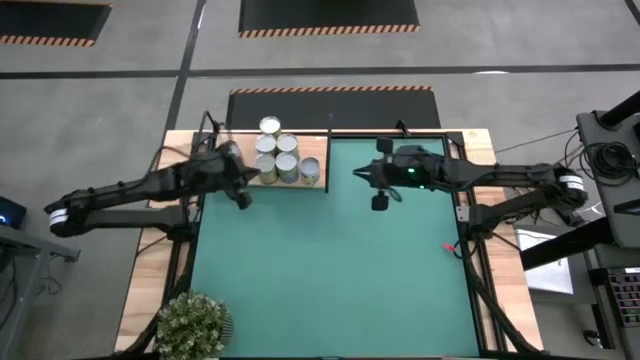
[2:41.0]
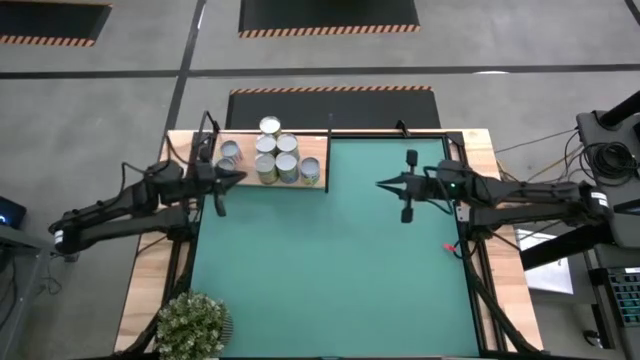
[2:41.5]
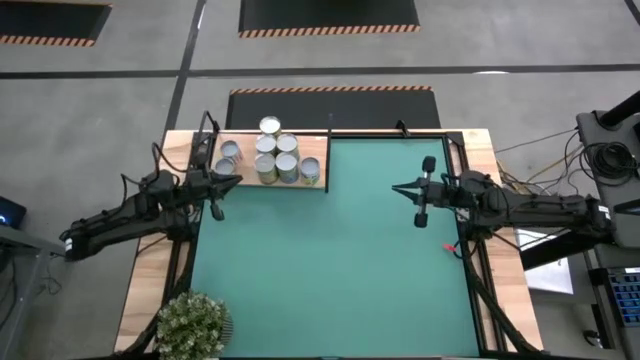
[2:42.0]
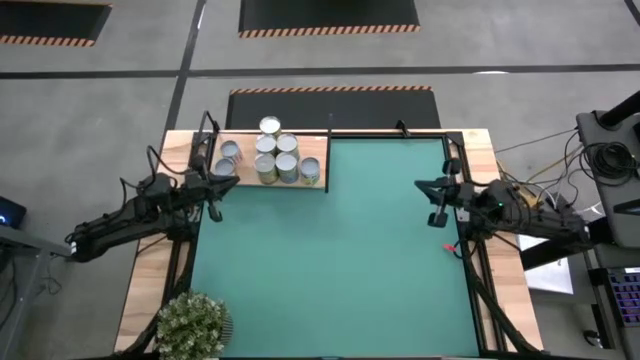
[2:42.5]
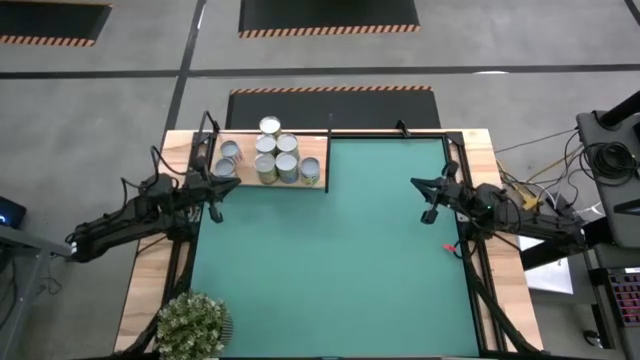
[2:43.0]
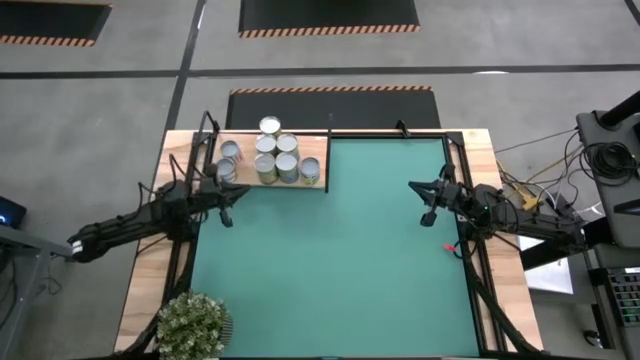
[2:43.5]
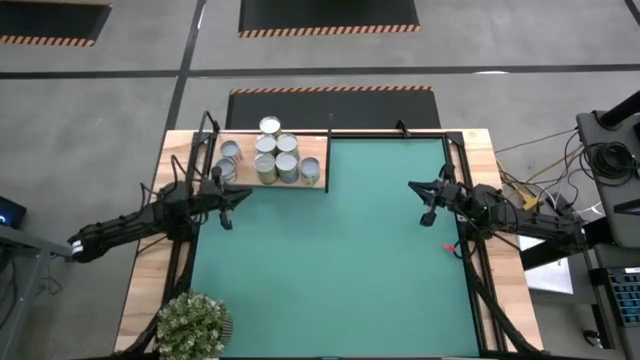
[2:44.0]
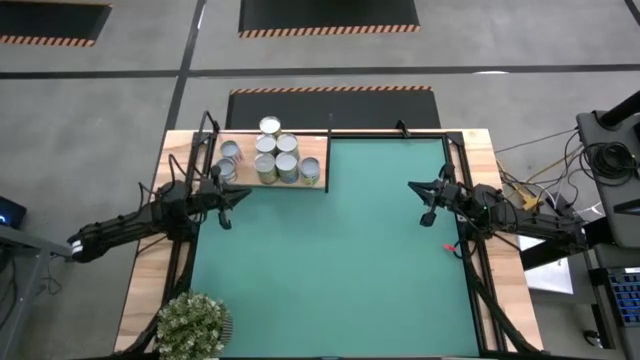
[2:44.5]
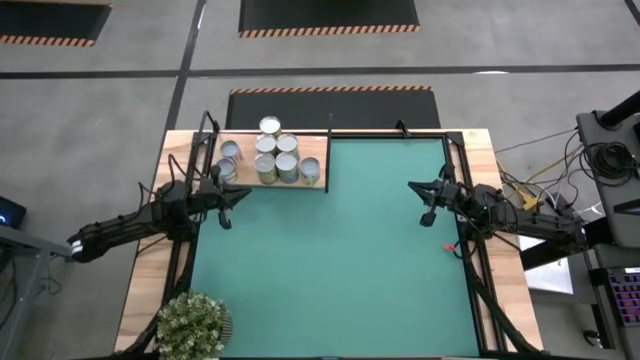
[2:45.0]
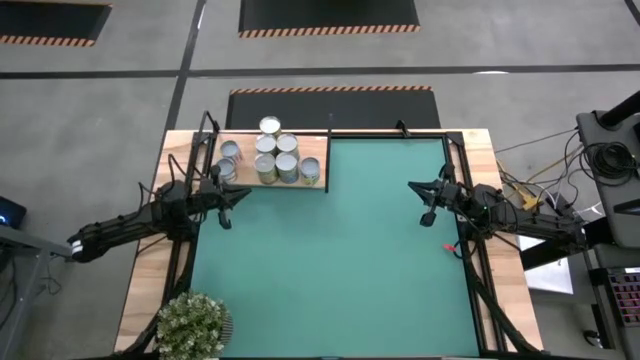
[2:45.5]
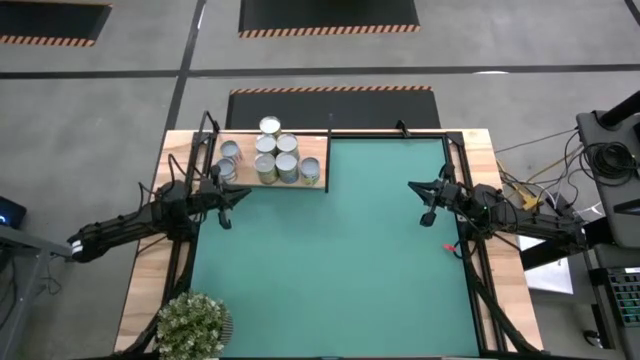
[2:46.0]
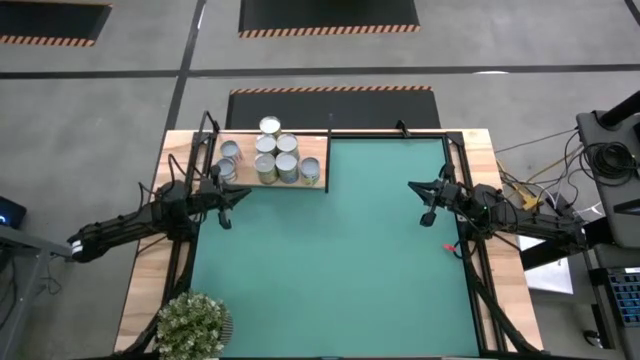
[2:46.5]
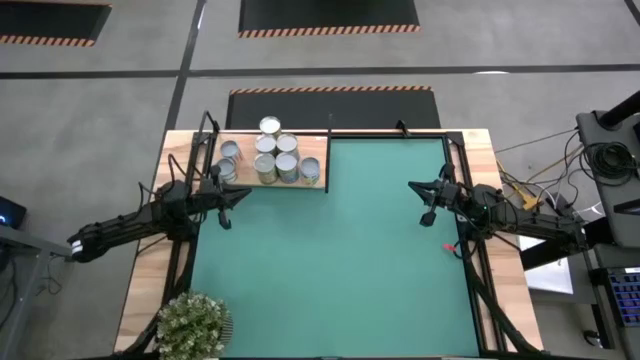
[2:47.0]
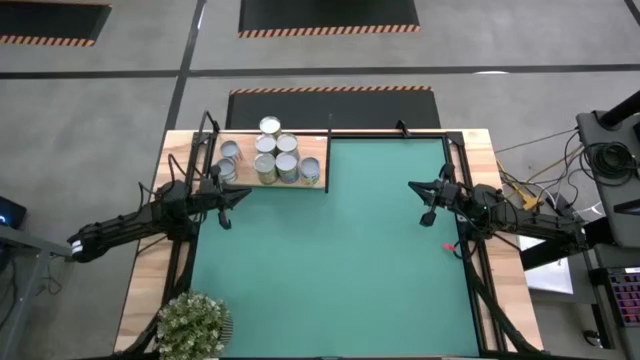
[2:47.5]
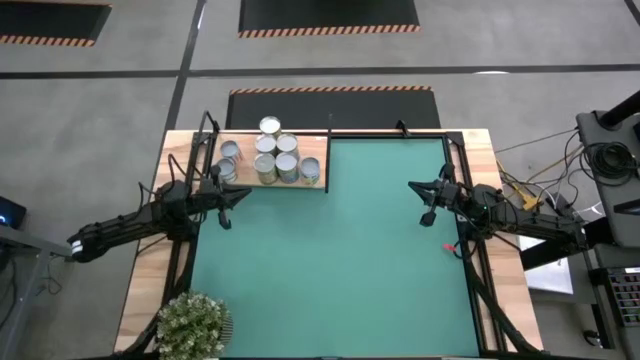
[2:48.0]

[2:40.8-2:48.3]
Task: Pick and place cans onto a shelf
Return to Home Position

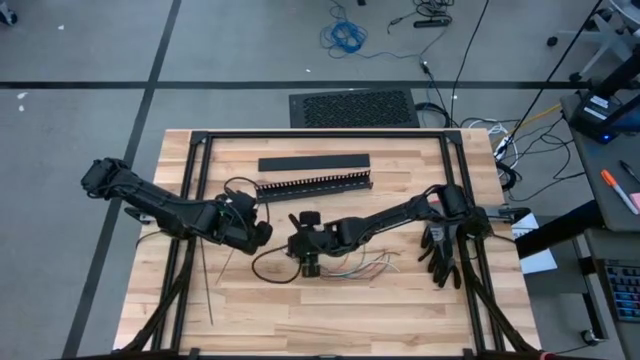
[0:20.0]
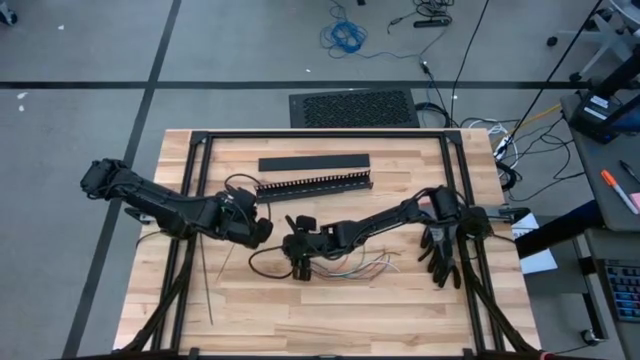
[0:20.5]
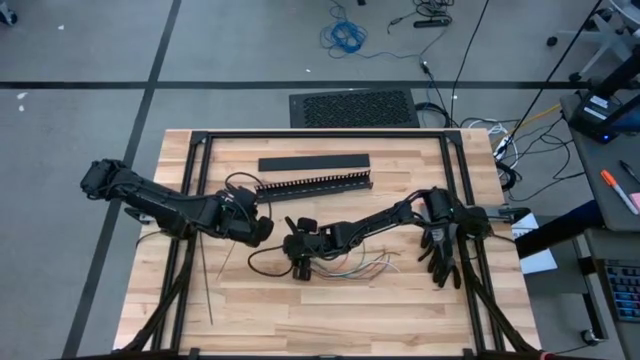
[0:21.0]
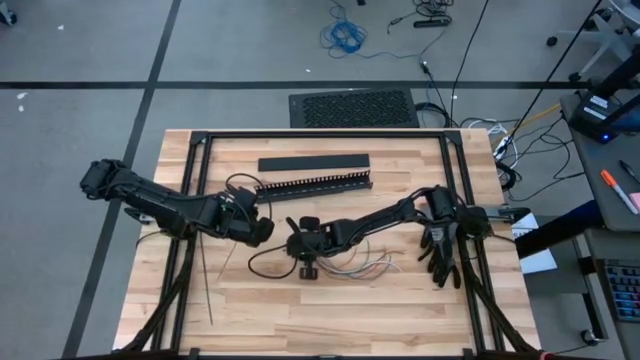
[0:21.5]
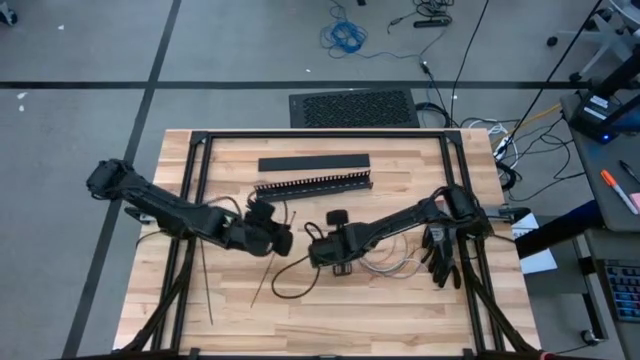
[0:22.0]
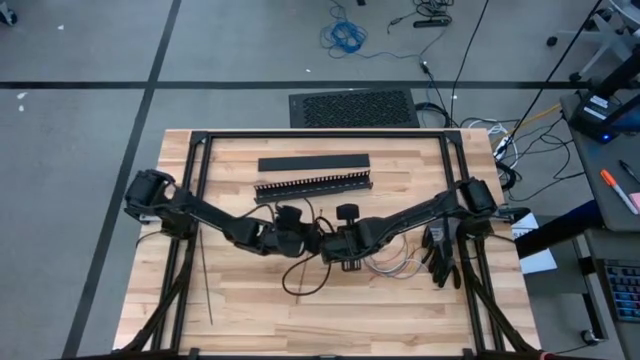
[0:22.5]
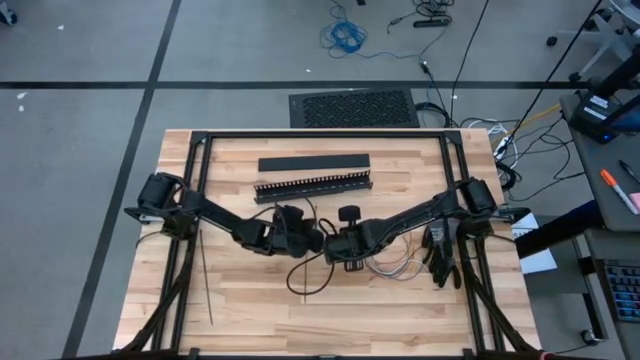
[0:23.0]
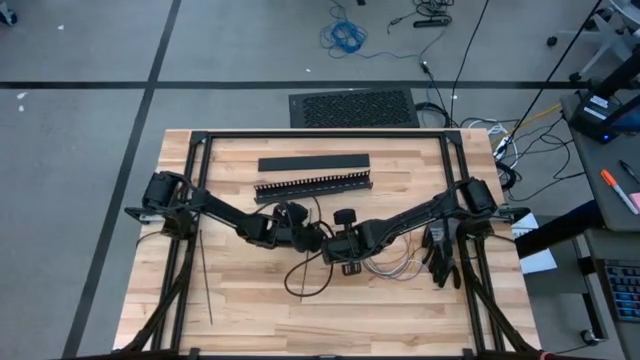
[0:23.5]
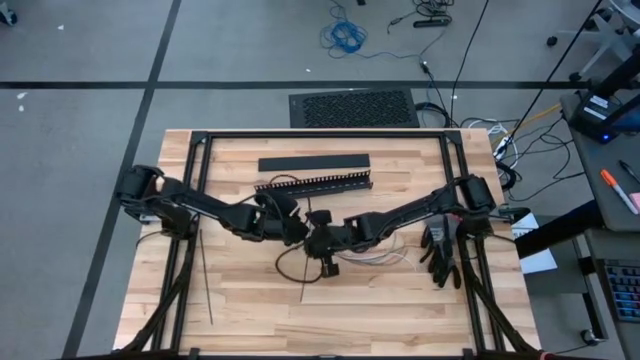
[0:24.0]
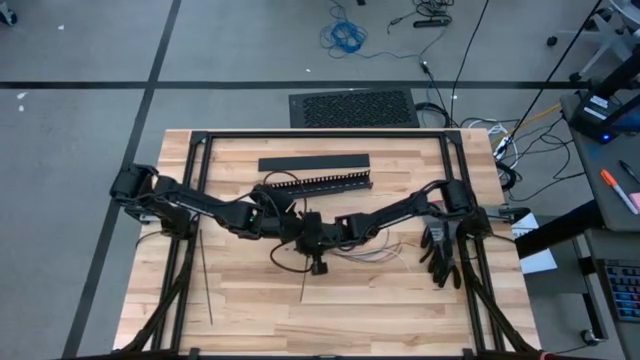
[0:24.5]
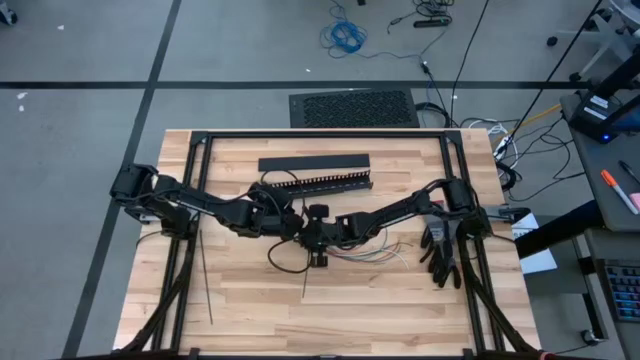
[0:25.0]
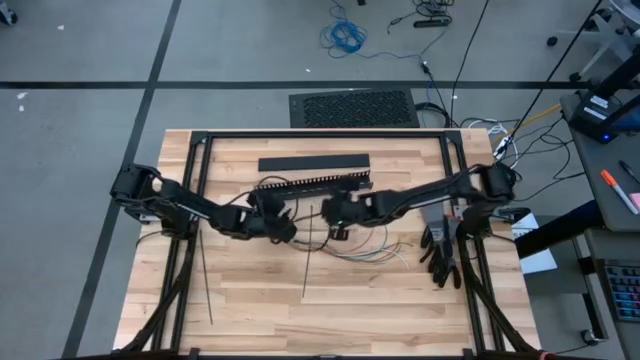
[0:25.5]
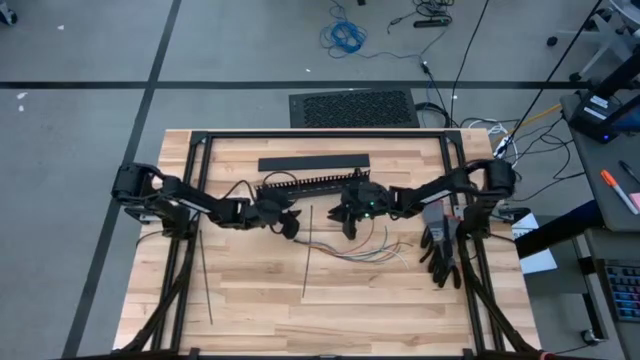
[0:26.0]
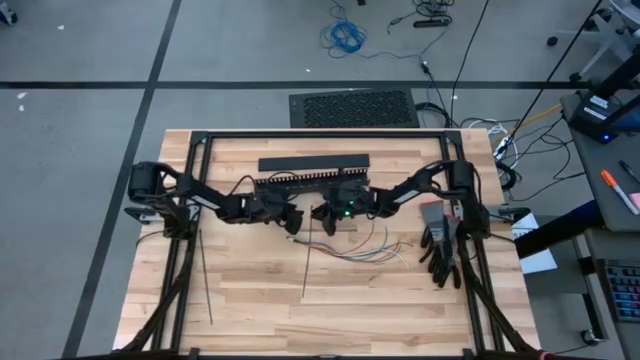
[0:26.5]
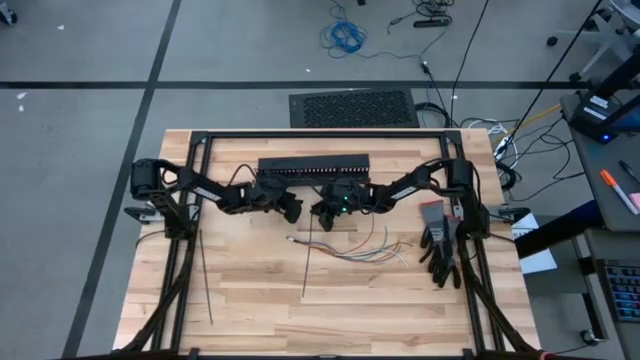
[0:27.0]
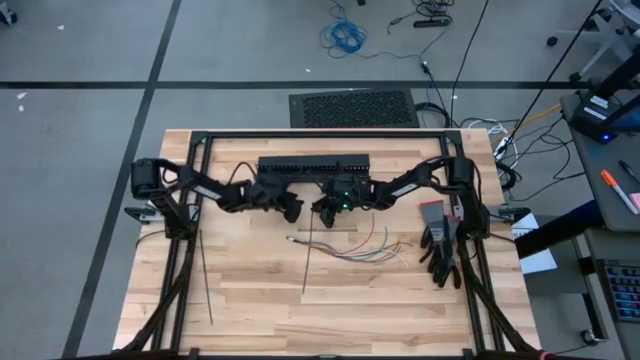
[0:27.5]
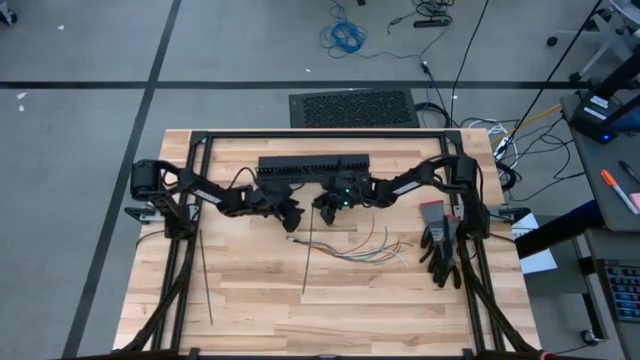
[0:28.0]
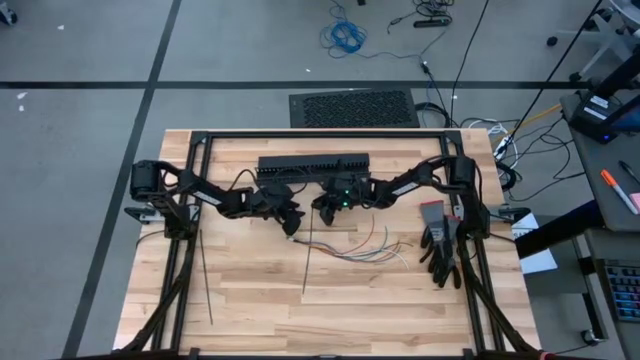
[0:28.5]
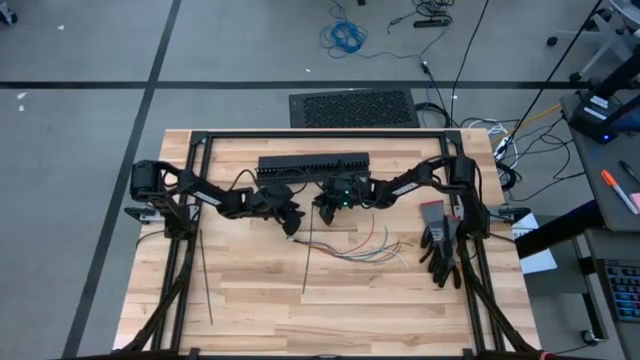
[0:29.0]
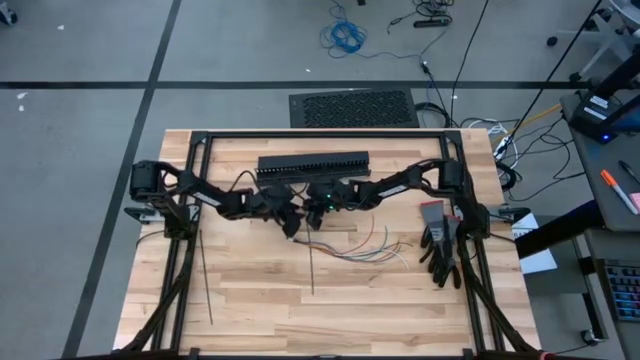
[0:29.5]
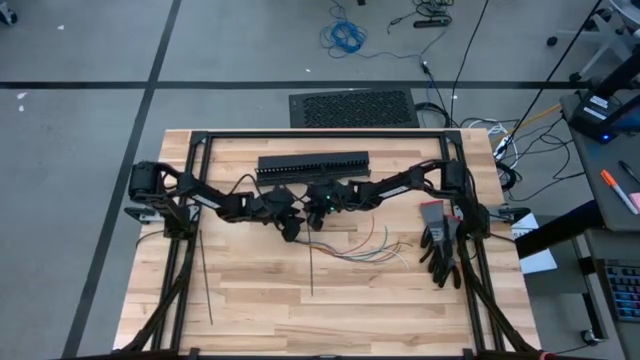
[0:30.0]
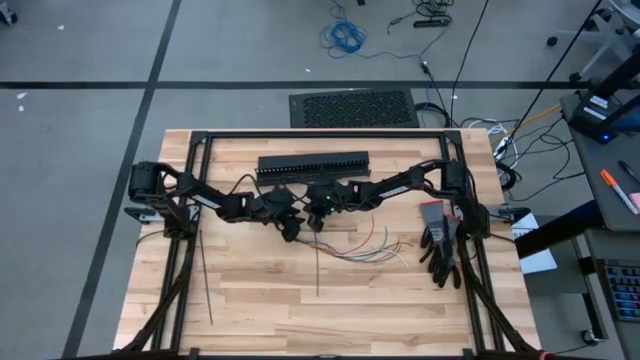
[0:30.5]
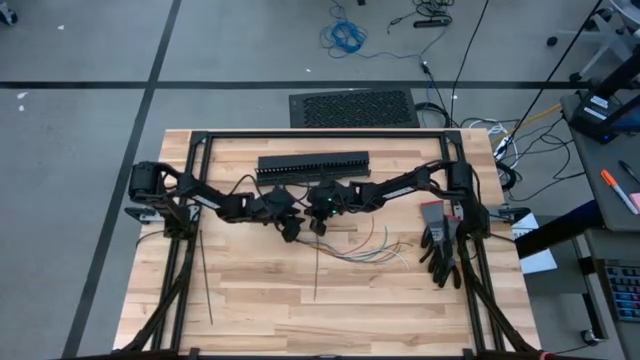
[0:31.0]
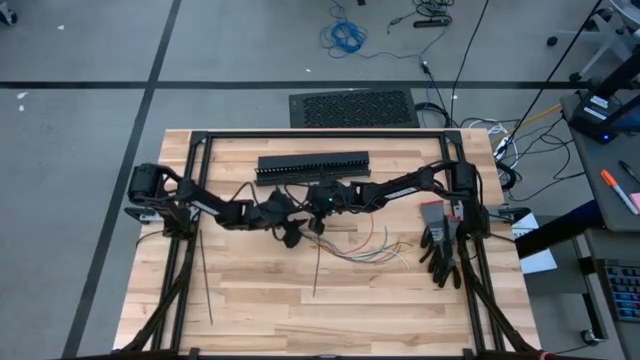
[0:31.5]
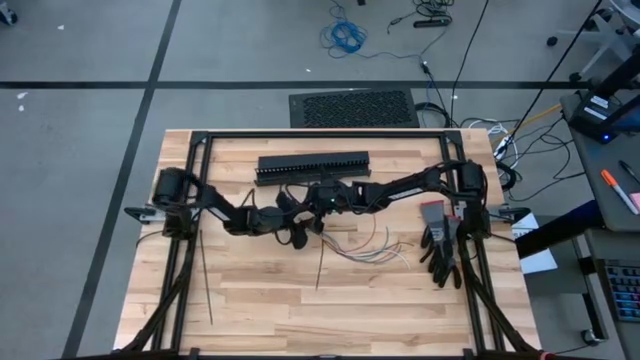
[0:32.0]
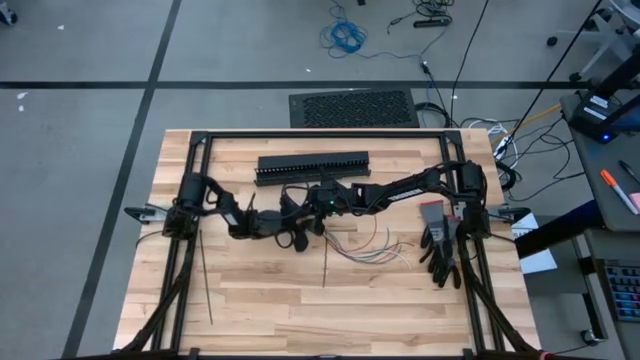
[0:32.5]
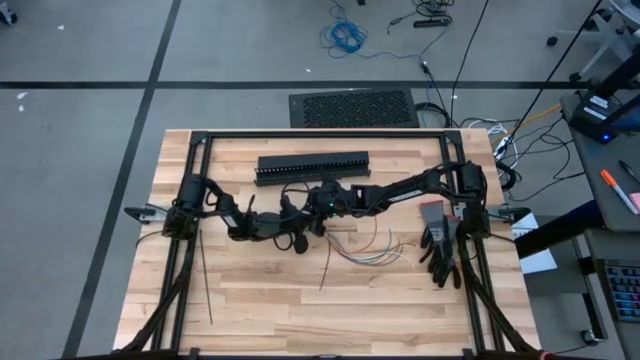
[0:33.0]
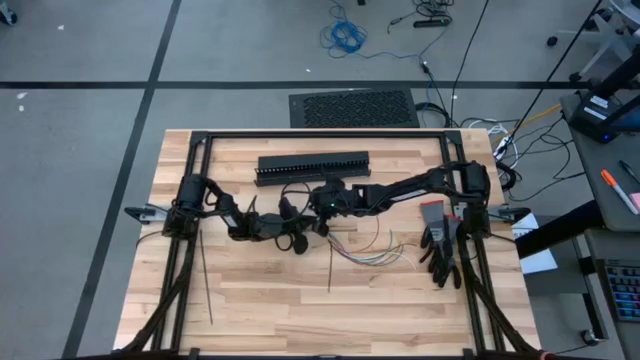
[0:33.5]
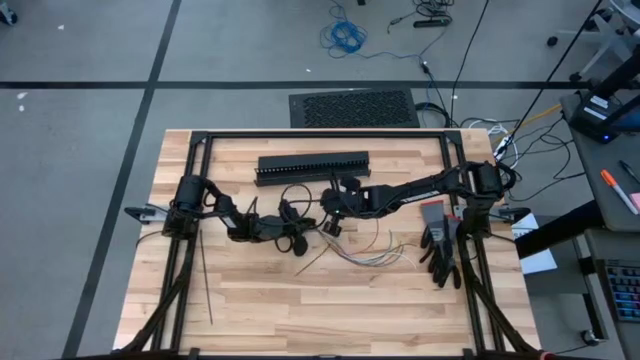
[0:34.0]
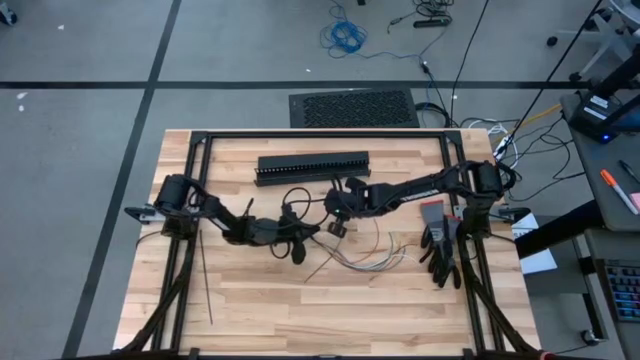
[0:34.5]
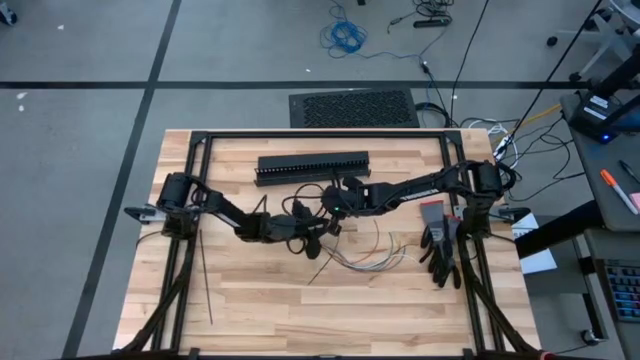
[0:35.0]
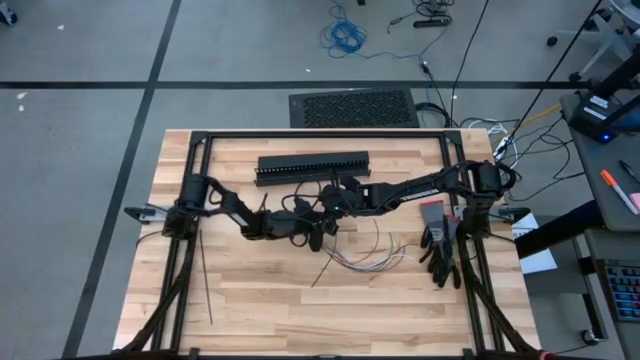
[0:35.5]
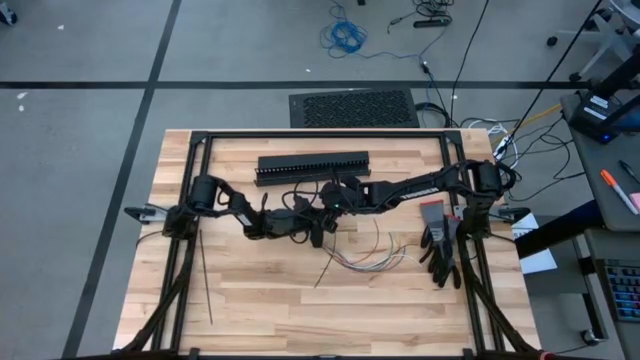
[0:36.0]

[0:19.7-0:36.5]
Task: Ziptie cables
Wrap the cable wires with the black zip tie
